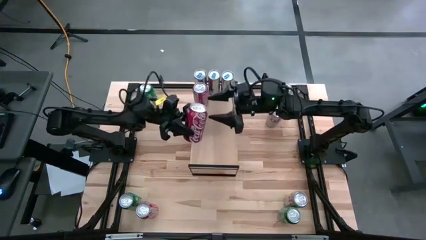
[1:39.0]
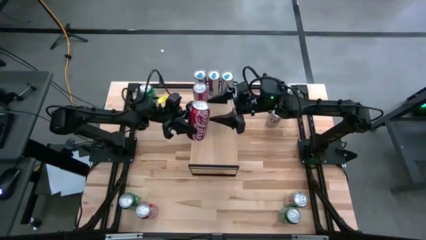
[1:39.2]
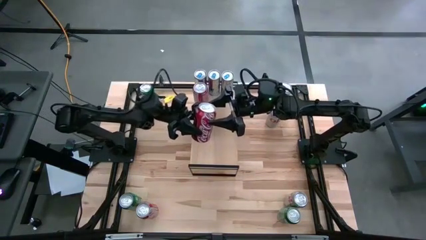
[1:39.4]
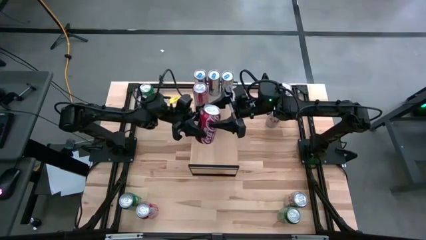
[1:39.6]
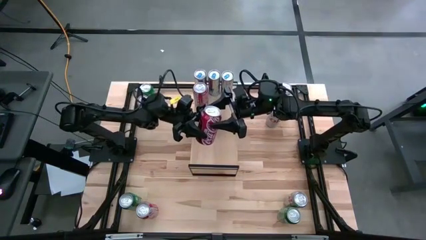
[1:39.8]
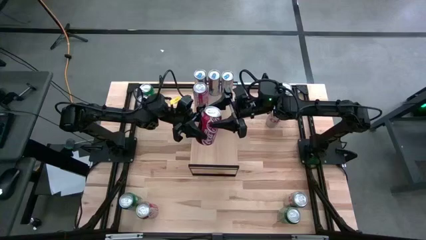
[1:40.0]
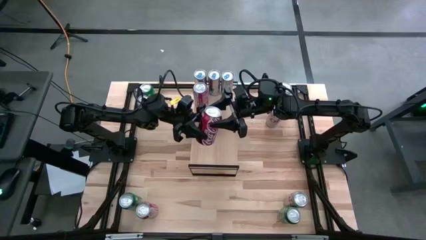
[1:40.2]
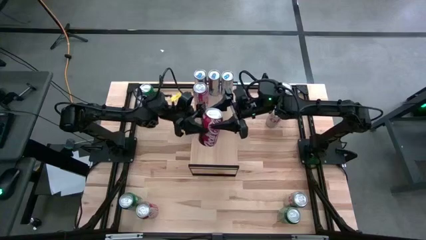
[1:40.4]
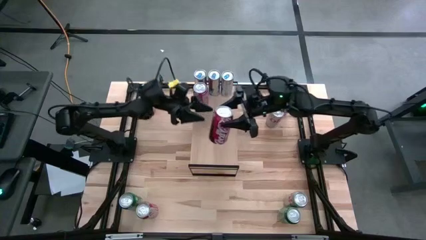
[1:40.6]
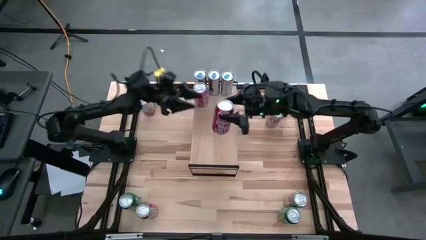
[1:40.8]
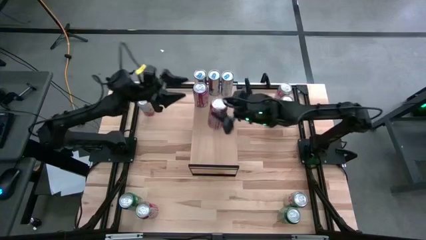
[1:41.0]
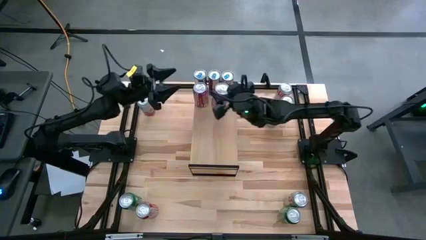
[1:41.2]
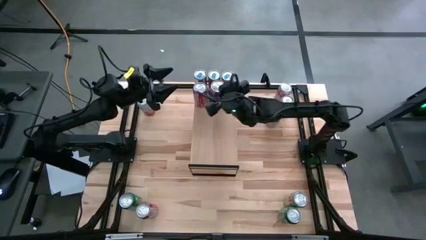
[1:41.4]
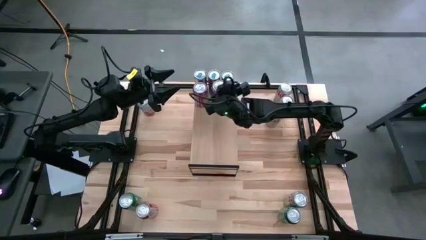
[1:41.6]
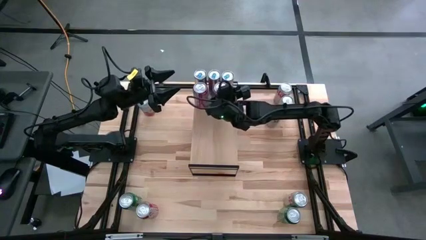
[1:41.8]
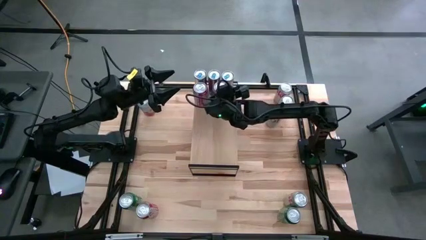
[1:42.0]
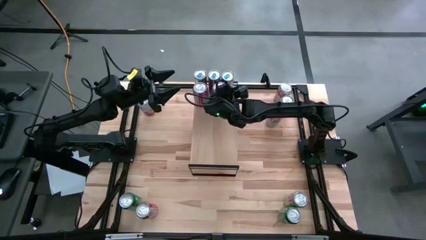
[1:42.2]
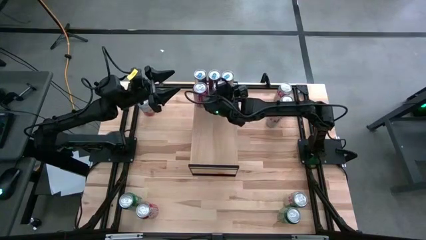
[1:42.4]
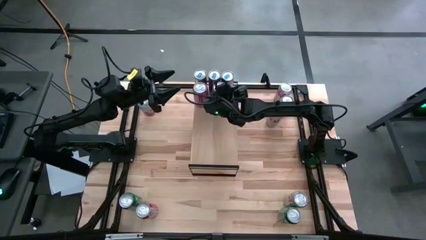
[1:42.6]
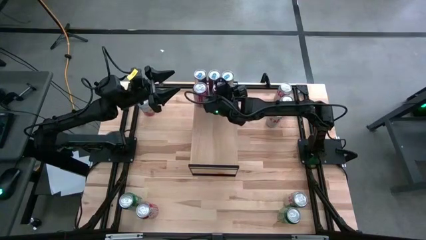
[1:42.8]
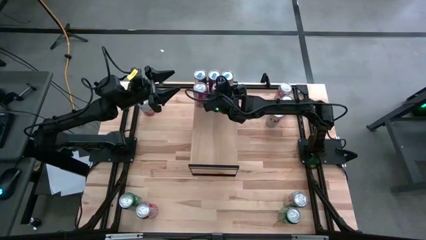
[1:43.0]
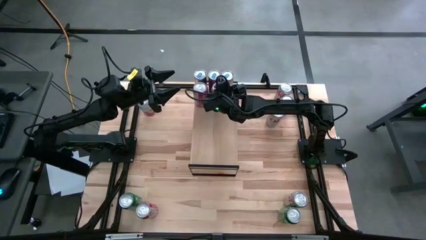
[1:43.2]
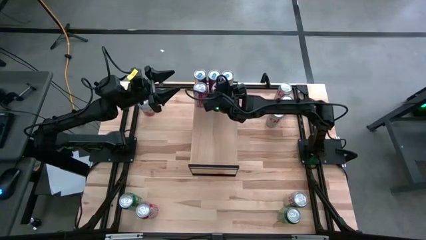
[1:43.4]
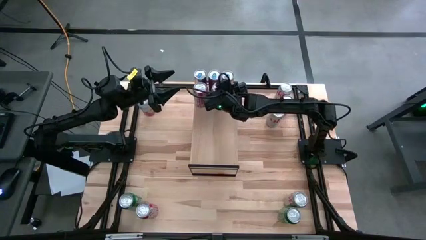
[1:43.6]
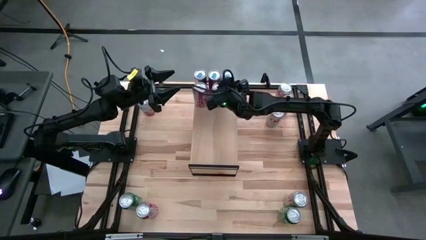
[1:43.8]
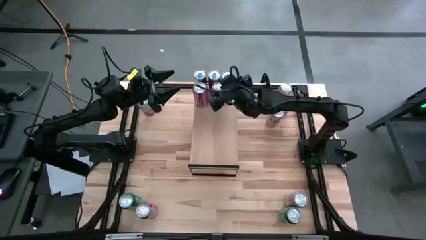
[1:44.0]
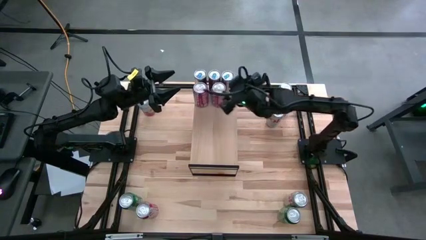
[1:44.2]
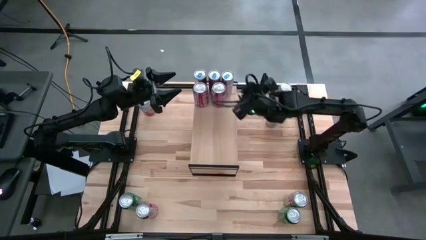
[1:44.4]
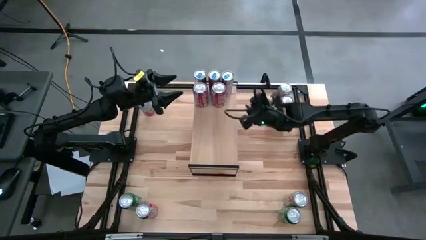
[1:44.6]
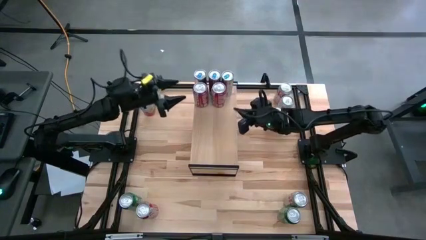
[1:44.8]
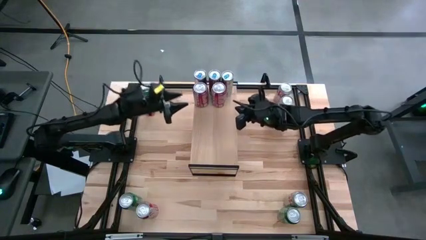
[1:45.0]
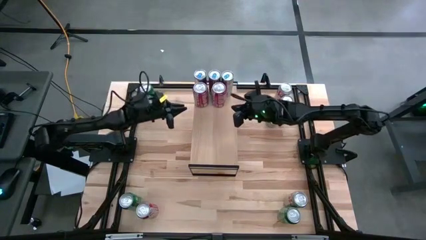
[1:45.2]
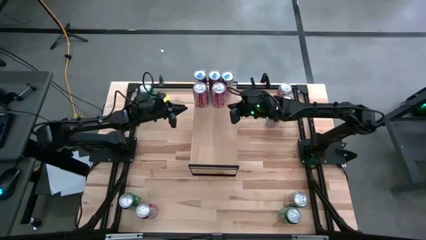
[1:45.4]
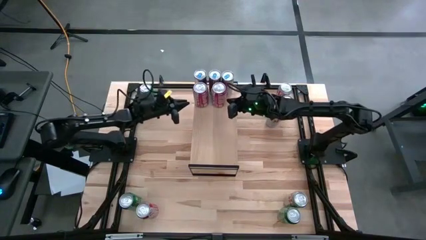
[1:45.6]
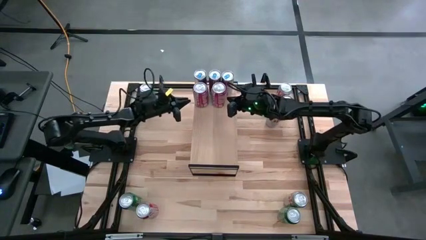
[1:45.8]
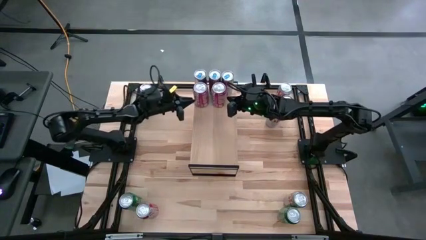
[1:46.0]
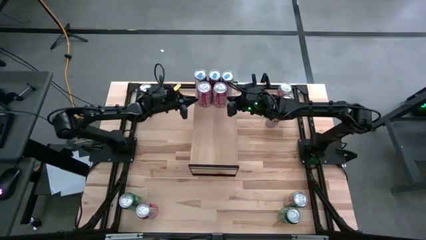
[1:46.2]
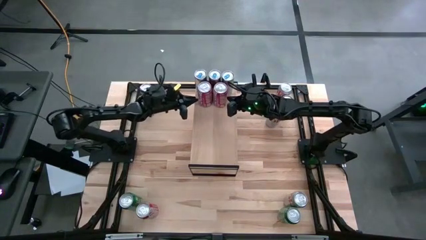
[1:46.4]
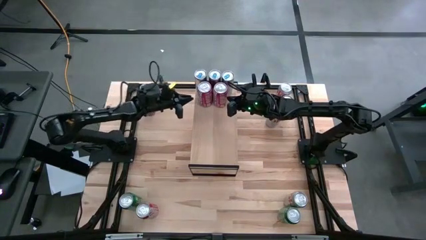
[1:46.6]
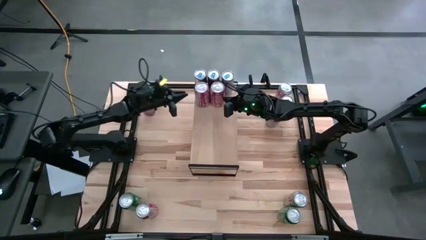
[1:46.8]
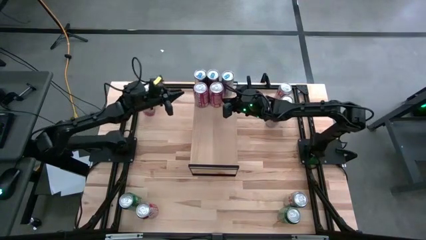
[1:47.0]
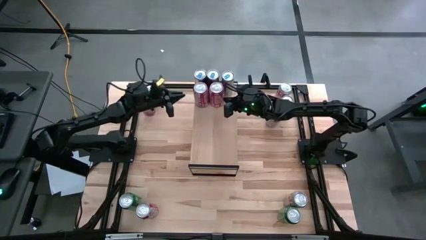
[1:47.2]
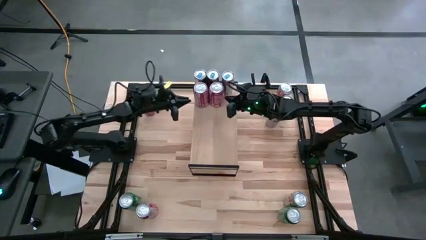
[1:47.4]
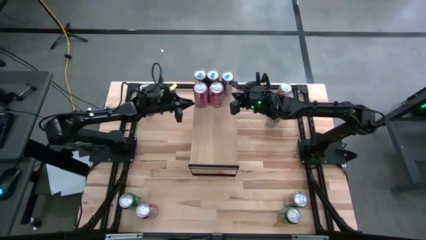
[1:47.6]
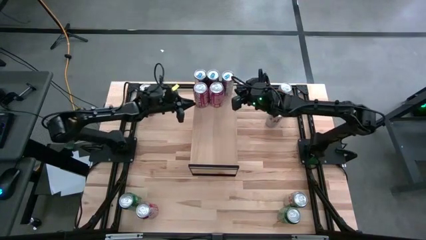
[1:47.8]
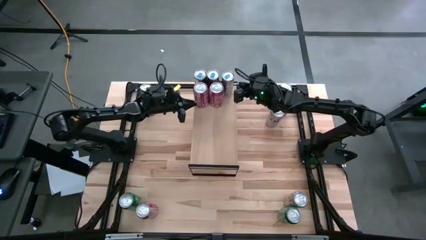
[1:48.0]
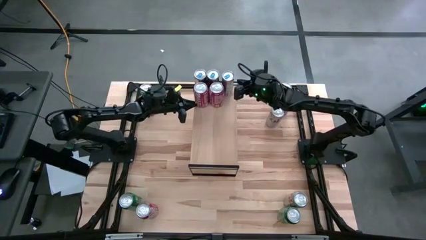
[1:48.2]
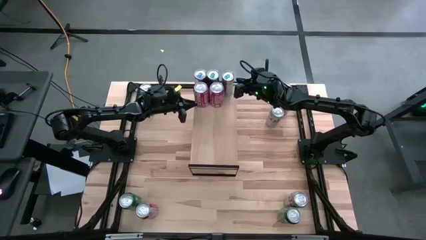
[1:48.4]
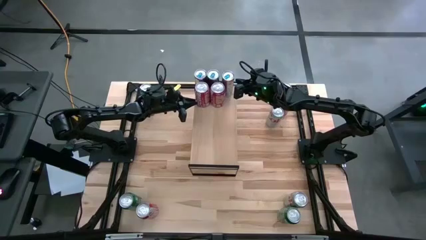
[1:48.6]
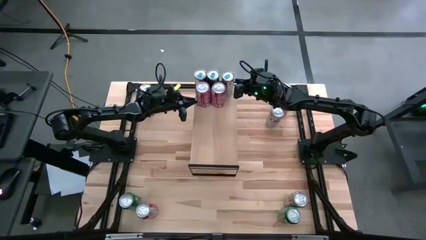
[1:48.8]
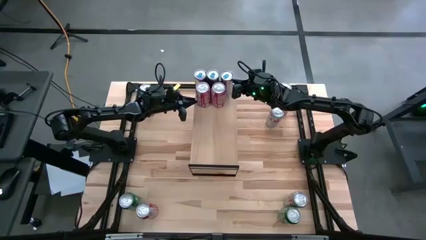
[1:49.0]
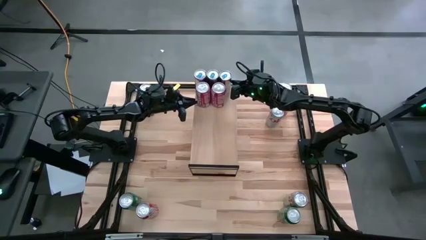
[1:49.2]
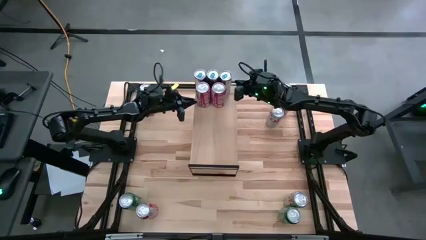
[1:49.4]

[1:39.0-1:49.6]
Task: Place canned beverage on shelf
Put the top red white soda can on the shelf

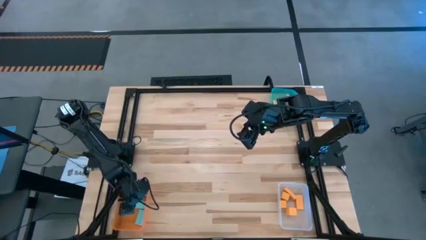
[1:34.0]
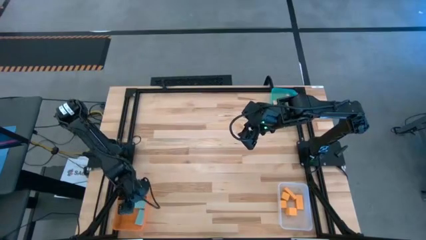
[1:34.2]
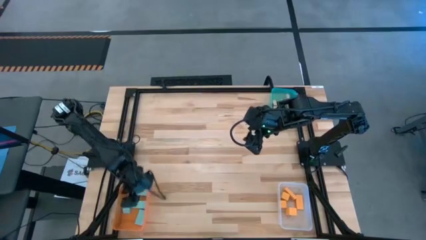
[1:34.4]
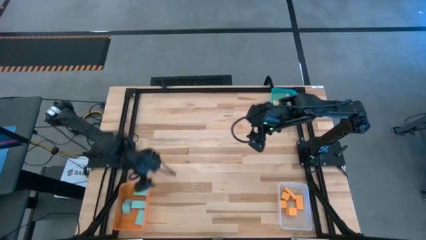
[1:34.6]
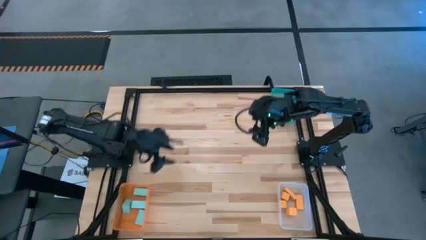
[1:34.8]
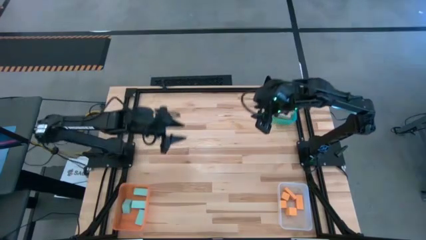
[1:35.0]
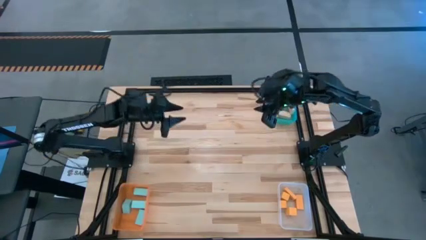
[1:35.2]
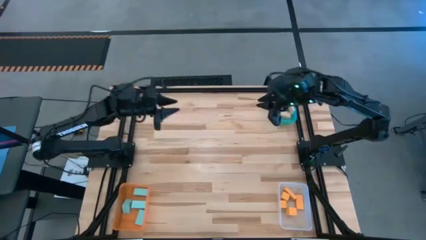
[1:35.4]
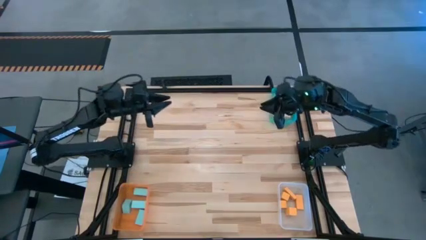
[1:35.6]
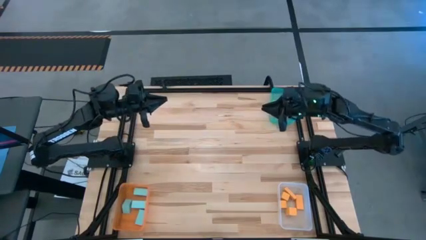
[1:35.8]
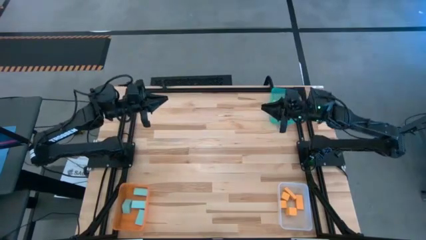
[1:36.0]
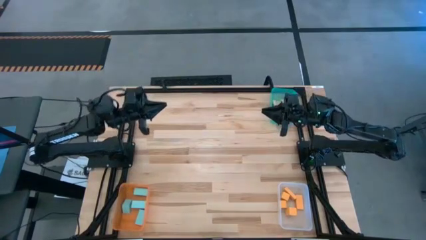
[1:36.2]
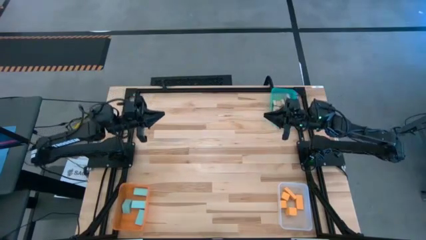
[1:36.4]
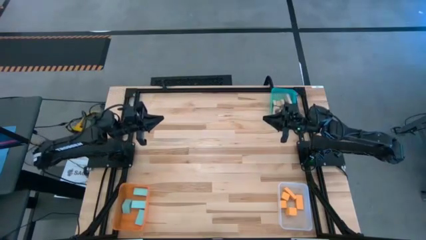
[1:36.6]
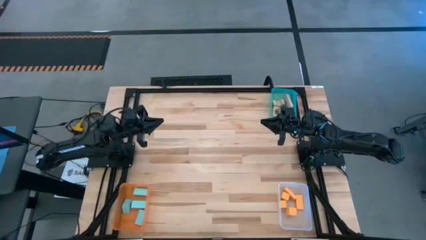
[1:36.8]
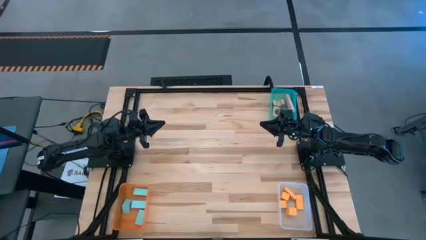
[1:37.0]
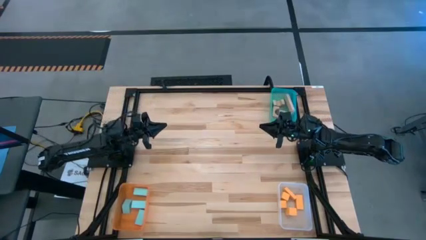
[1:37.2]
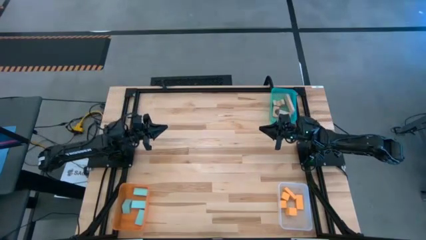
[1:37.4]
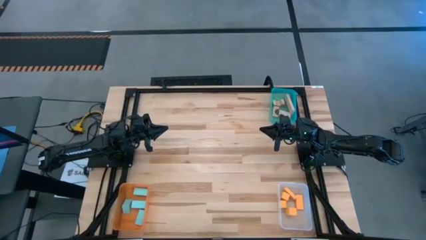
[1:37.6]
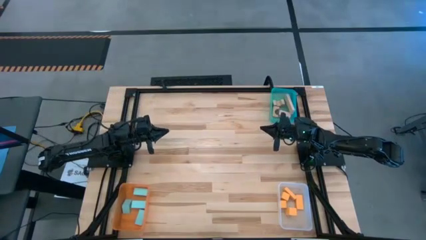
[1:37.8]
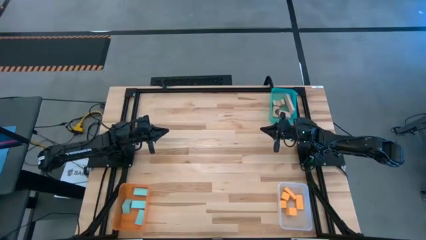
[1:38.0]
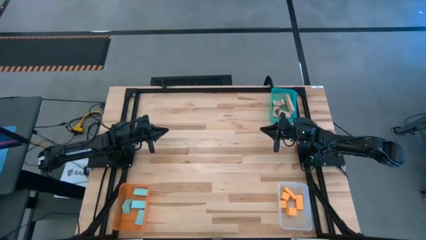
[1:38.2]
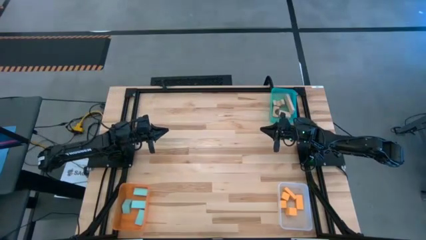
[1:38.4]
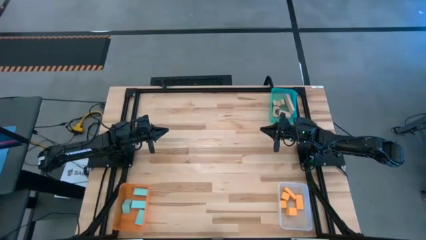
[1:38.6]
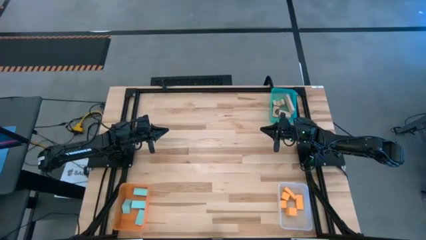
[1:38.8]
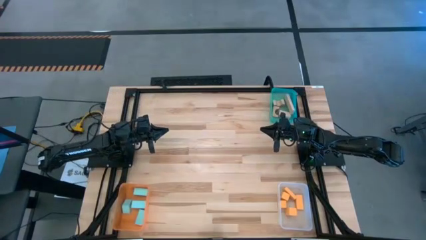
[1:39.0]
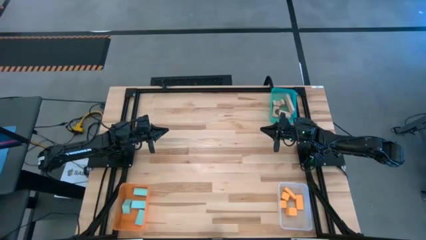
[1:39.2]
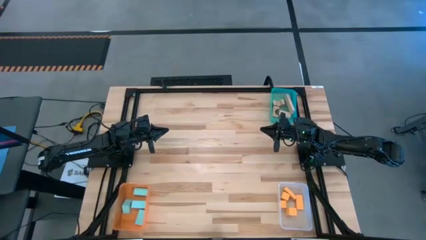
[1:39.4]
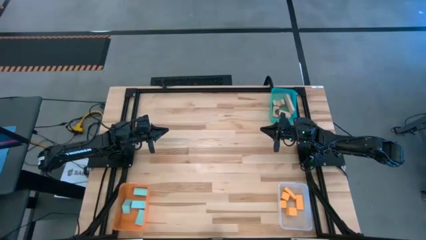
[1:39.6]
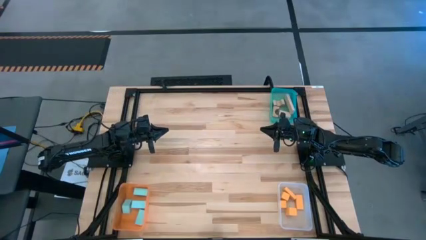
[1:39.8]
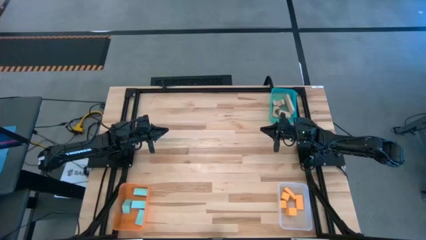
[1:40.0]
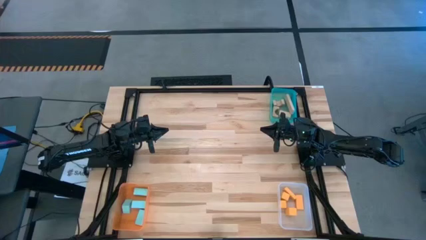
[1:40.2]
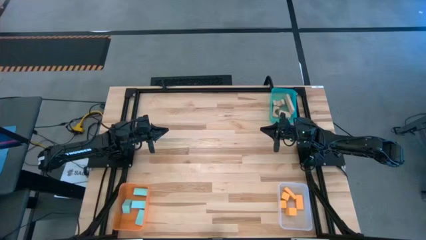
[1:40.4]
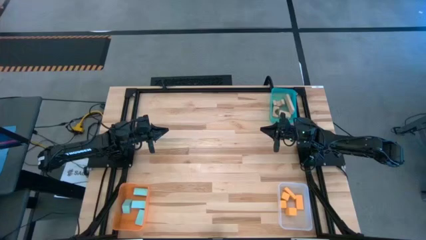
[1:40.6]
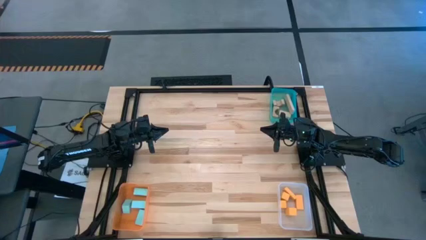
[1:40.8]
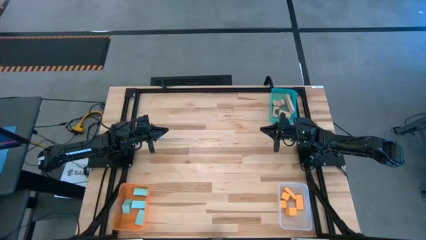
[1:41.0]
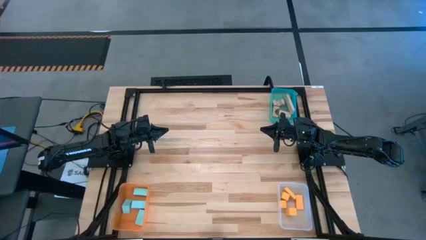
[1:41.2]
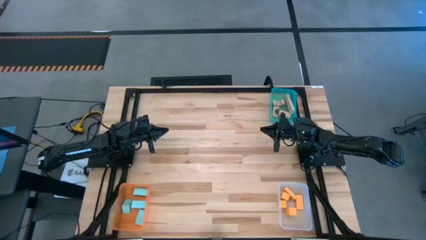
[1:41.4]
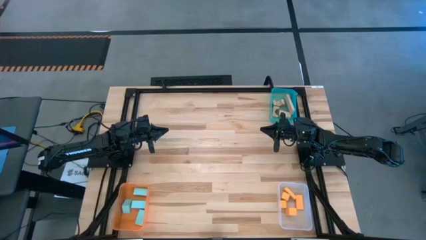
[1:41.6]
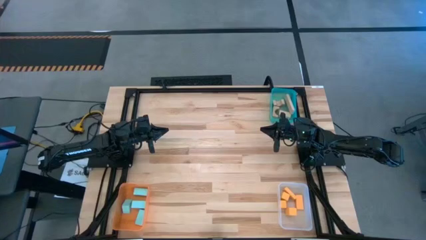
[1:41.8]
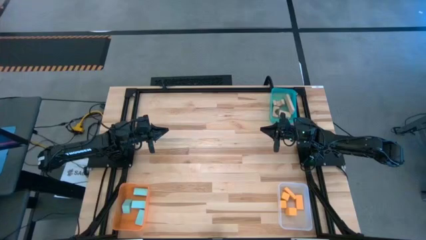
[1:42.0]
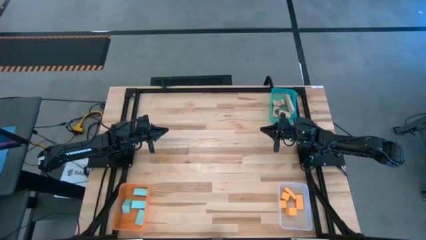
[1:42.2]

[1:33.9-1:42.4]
Task: Sort & place blocks by color
Return to Home Position
